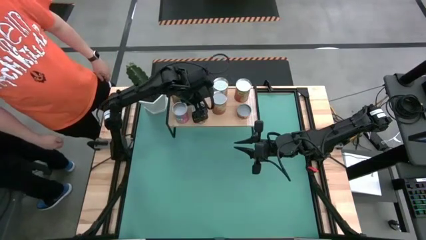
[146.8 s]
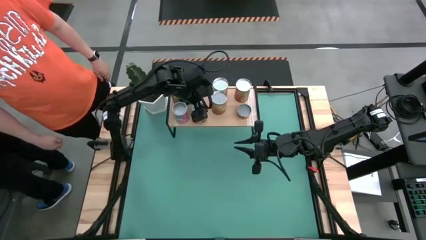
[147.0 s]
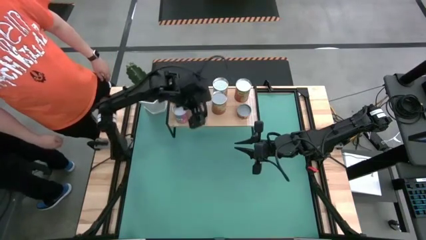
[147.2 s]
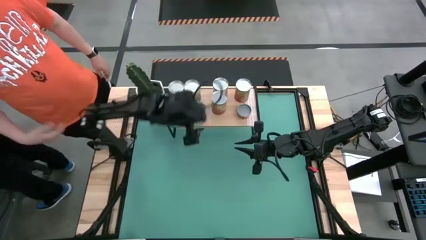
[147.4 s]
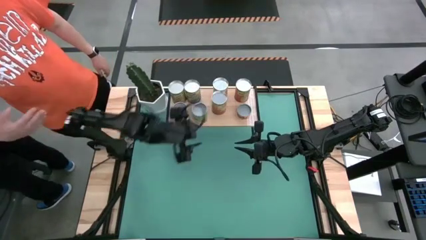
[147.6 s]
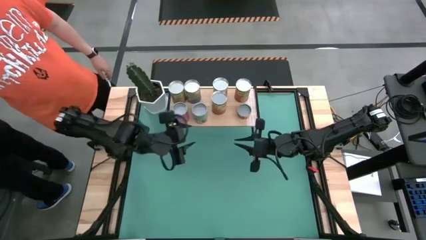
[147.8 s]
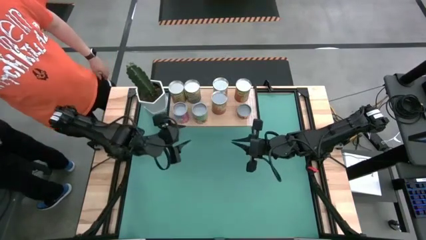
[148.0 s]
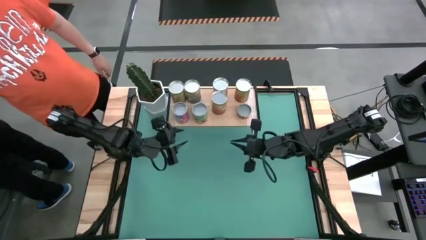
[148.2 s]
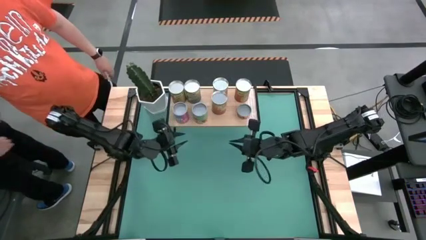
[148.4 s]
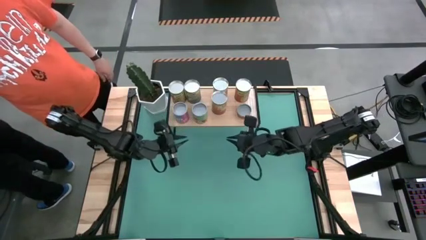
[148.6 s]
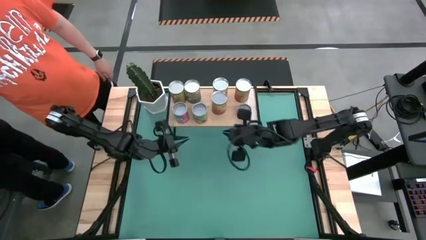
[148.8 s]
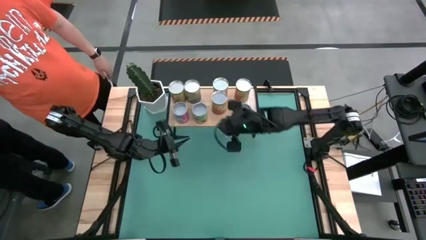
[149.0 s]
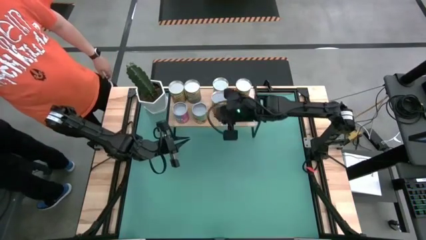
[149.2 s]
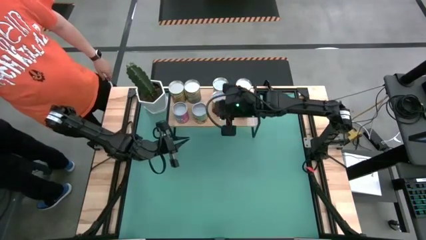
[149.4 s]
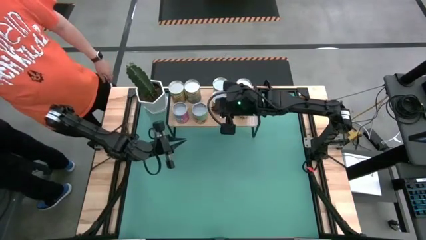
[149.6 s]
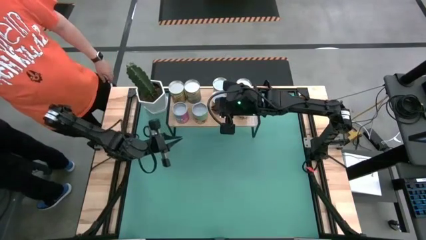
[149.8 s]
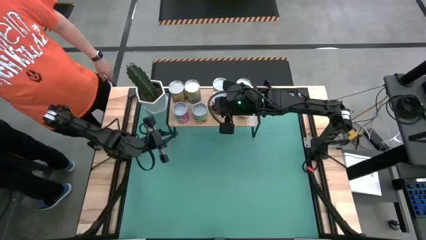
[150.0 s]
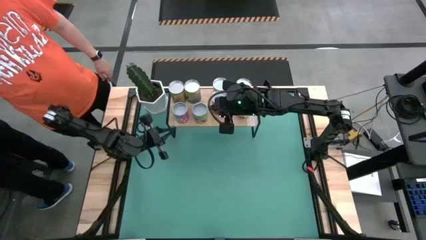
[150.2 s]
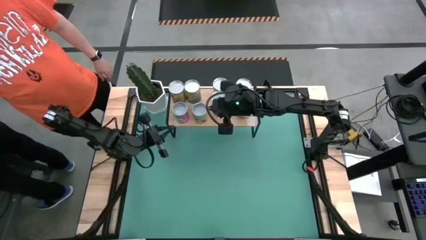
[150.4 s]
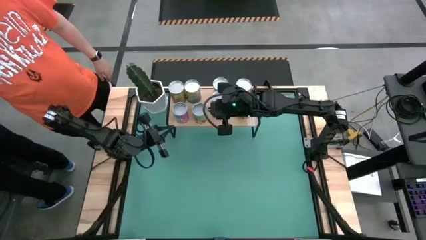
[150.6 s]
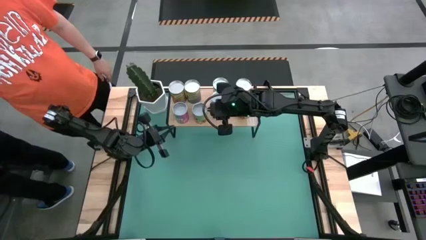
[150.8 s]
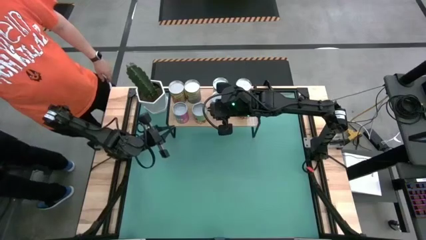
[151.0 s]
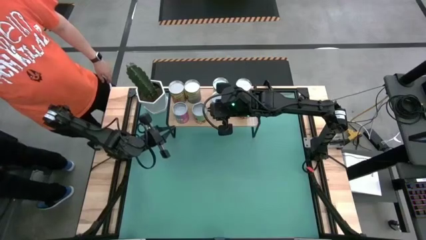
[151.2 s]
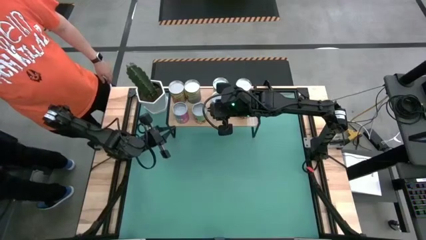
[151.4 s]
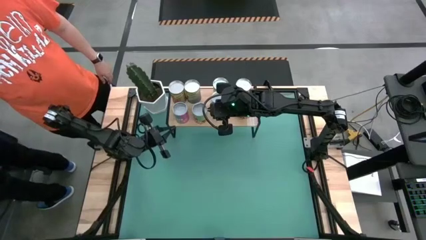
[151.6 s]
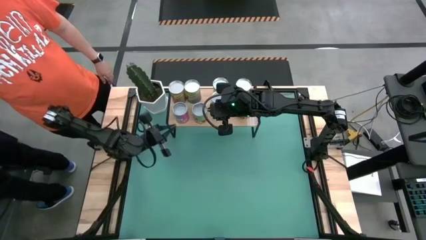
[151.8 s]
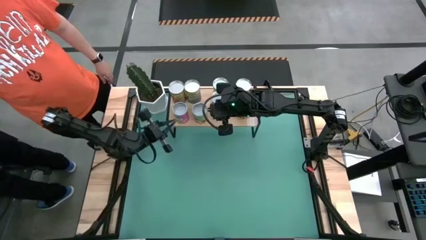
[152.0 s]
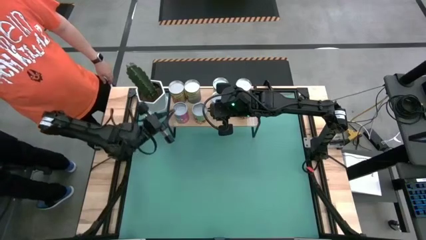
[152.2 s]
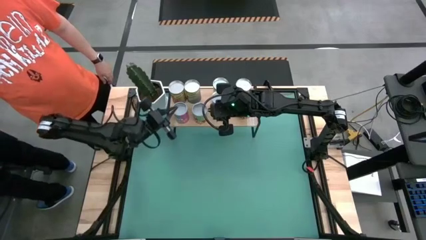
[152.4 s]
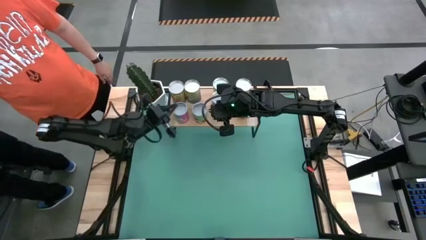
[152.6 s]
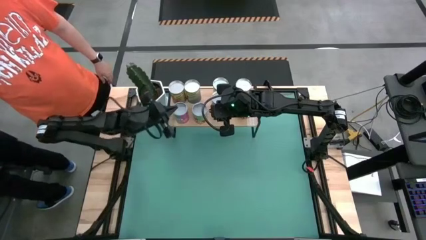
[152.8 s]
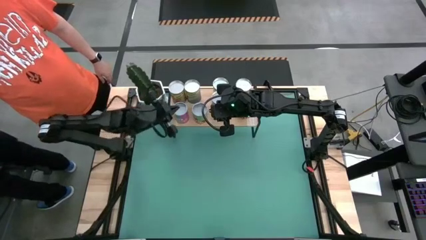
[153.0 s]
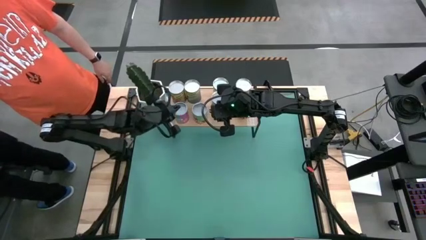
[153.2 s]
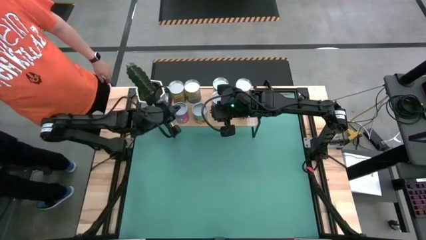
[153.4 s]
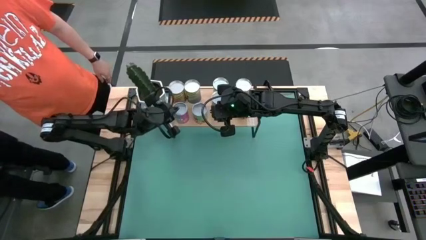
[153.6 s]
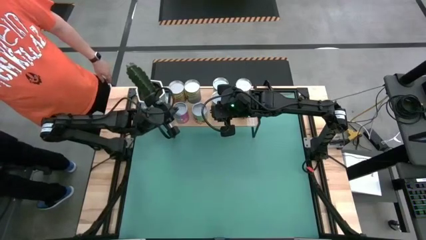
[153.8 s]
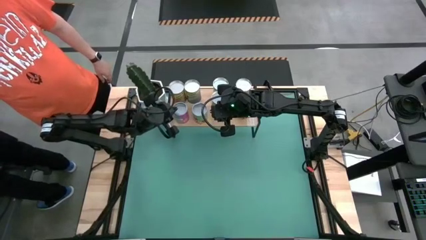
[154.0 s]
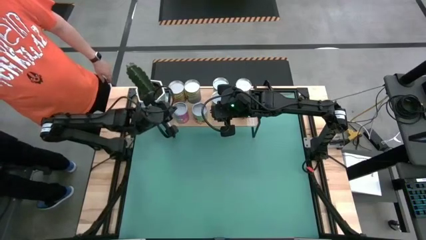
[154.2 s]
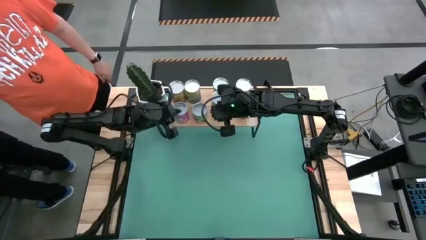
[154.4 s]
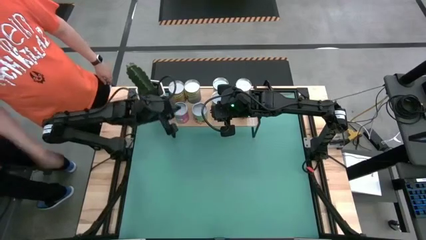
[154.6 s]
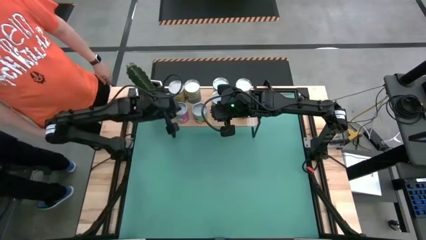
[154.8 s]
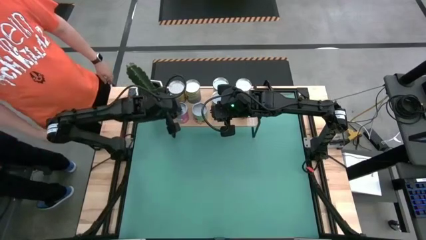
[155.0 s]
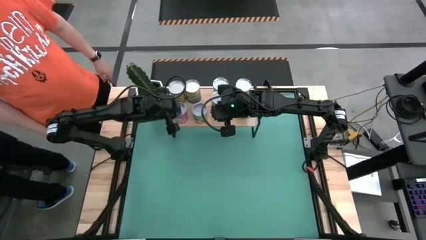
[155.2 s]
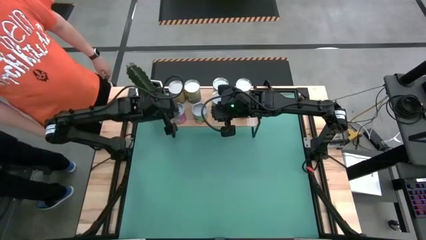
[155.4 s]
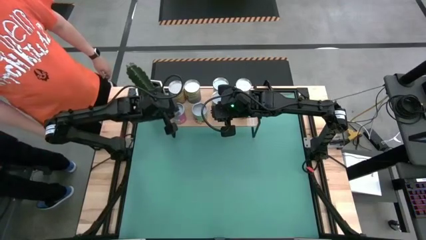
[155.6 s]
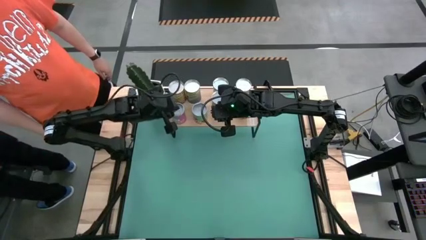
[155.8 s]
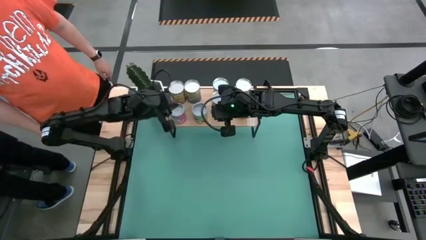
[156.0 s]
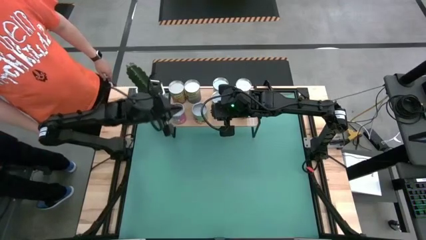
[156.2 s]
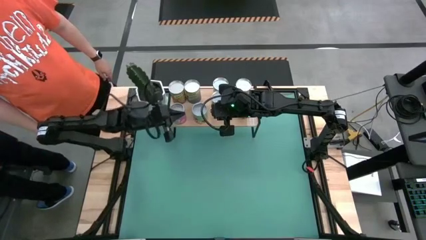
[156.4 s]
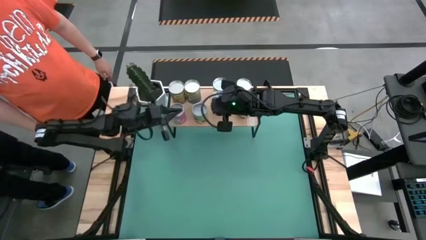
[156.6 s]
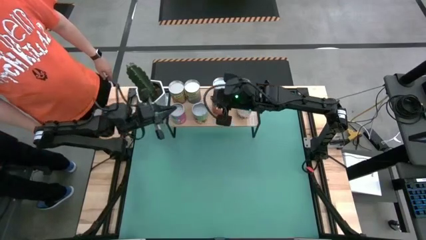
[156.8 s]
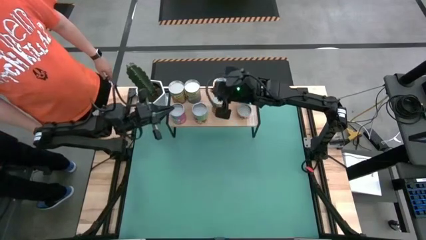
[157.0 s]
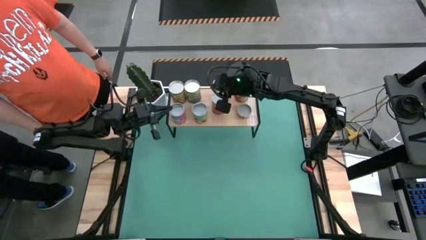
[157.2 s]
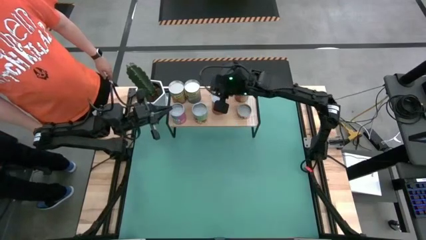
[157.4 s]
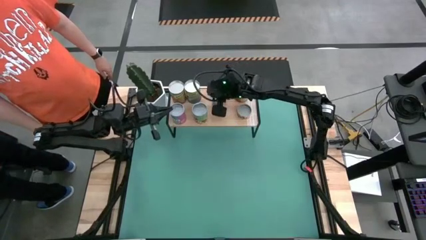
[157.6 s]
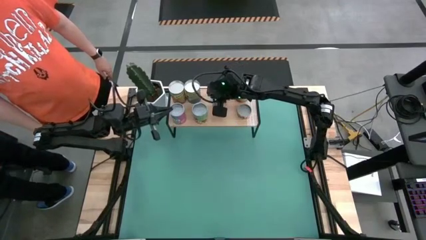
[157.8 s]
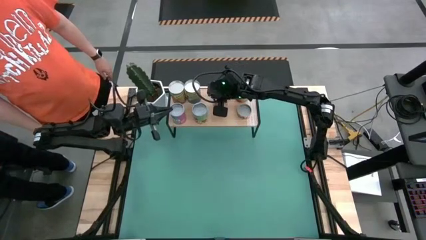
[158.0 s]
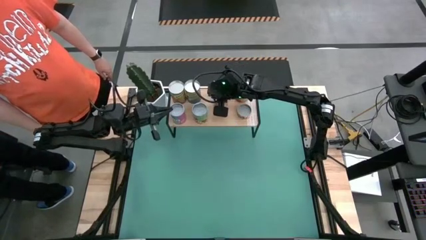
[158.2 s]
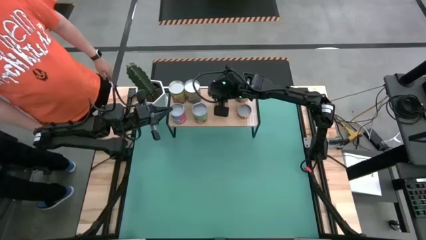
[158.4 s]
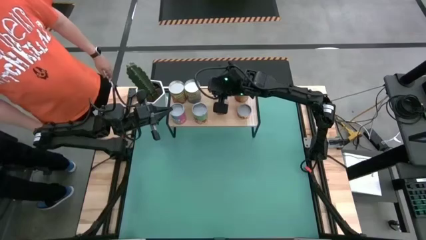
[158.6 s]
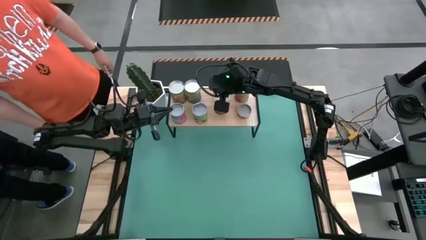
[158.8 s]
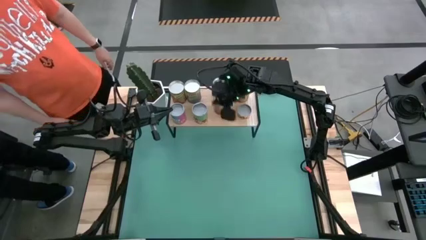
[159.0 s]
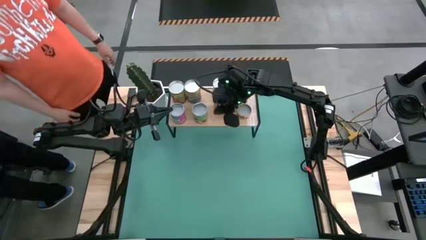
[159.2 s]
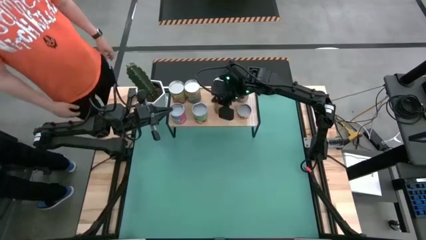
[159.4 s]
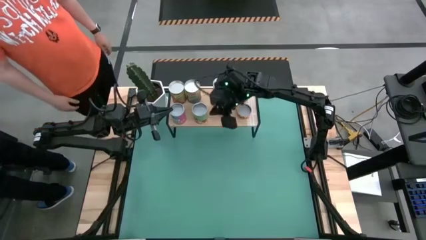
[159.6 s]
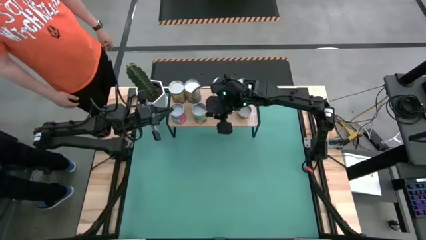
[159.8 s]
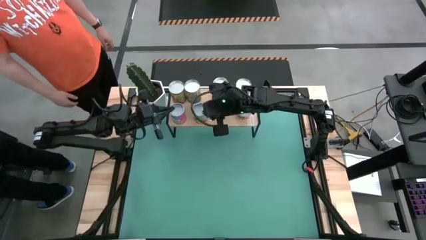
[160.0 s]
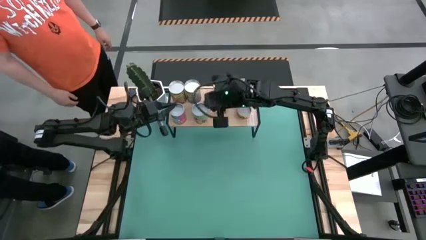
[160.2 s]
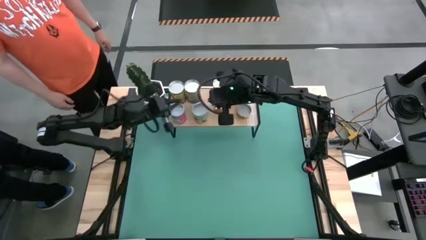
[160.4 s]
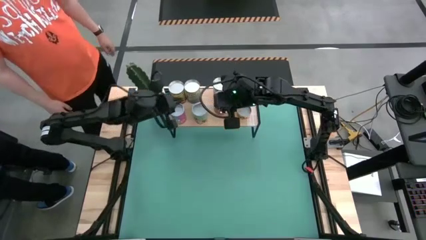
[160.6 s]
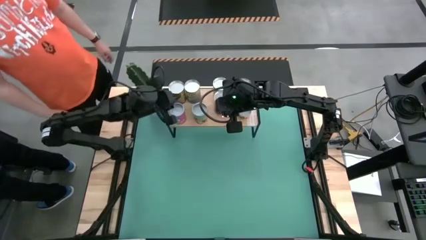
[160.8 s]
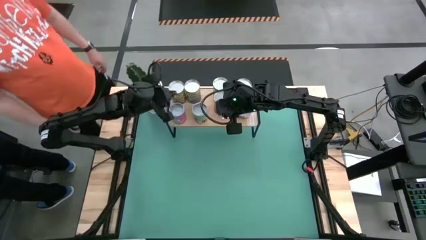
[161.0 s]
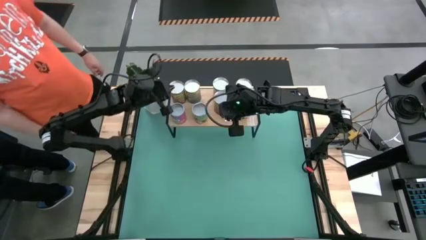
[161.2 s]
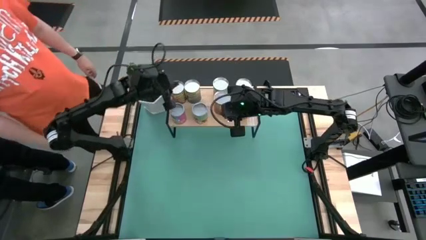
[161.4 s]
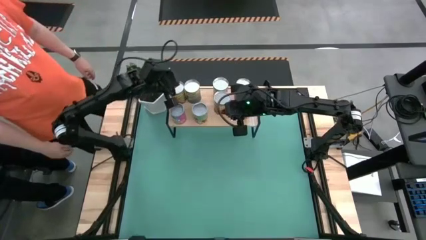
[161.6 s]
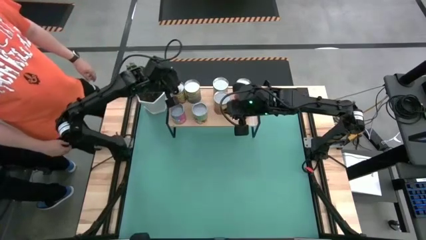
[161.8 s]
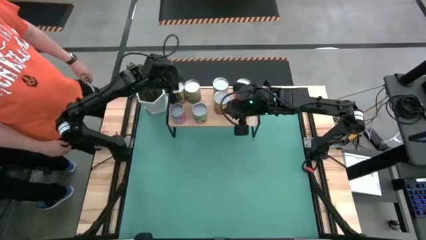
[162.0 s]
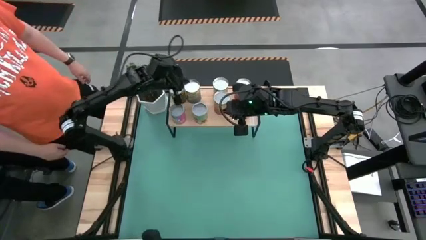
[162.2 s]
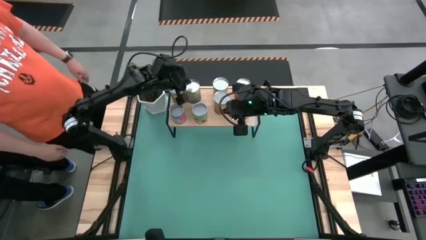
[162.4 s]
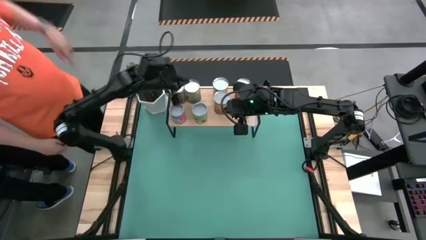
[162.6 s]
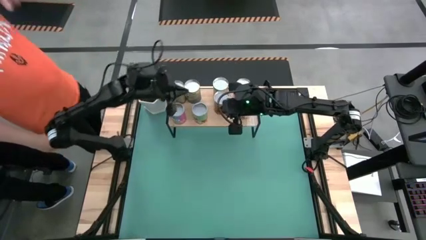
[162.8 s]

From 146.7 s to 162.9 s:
Task: Pick and place cans onto a shelf
Adjust the canned goods on the shelf

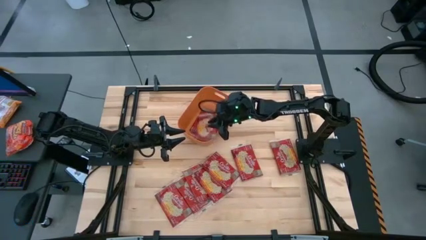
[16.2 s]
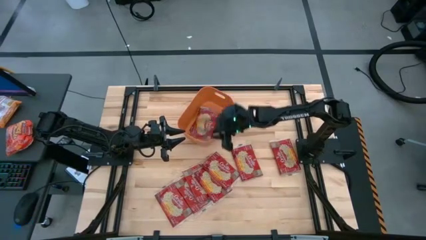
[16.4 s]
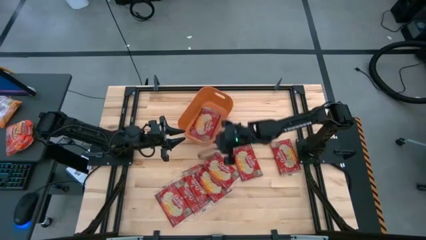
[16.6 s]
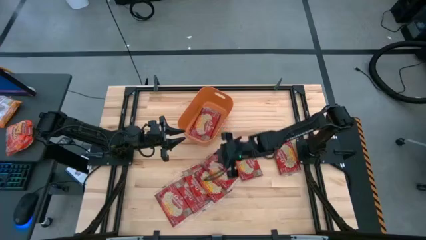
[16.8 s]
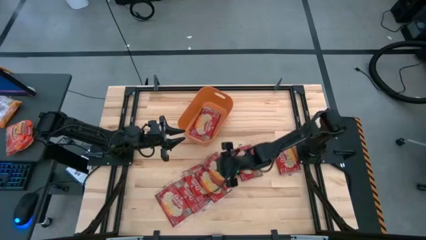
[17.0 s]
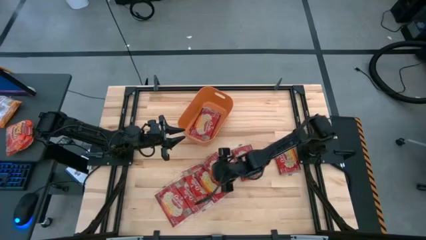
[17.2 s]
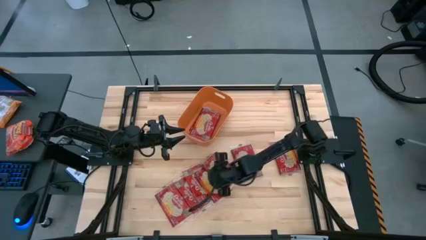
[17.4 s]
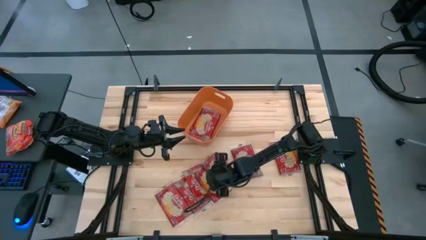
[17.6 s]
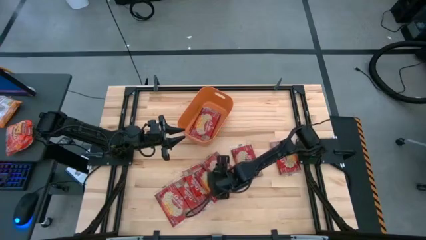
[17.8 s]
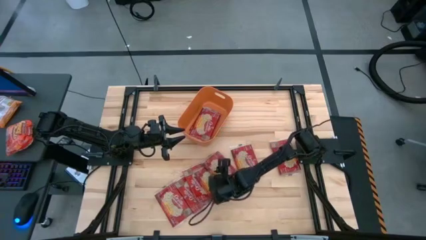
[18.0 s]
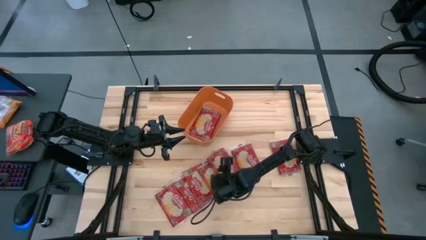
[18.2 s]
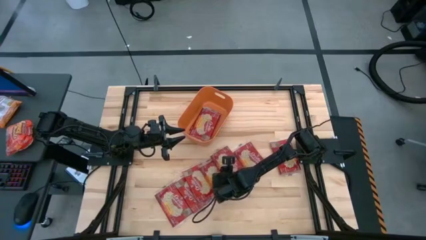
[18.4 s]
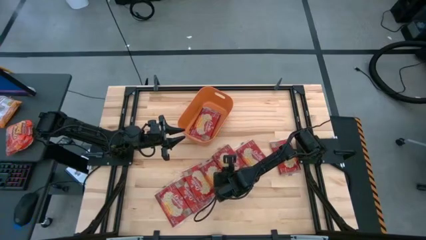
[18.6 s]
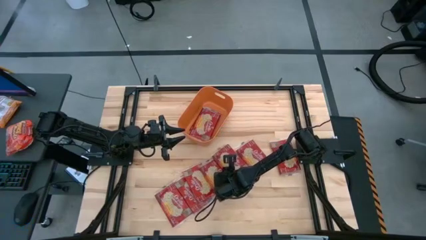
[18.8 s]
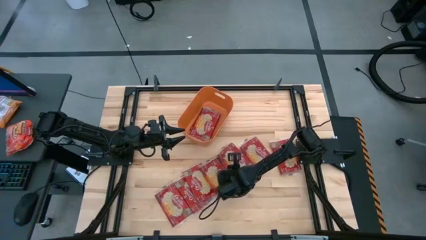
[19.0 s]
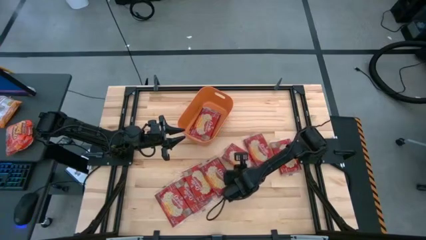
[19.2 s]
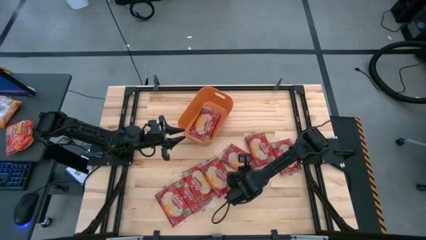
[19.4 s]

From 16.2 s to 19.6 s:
Task: Sort popcorn bags into baskets
Put the red popcorn bag into the orange bin
